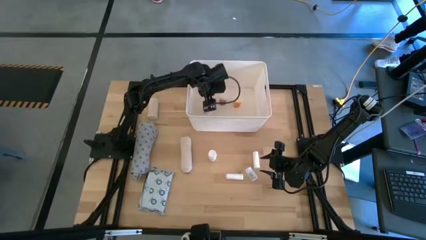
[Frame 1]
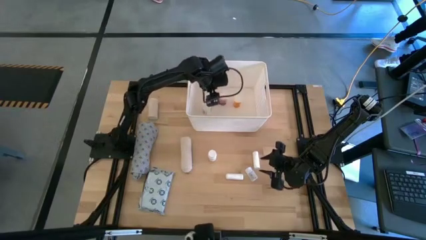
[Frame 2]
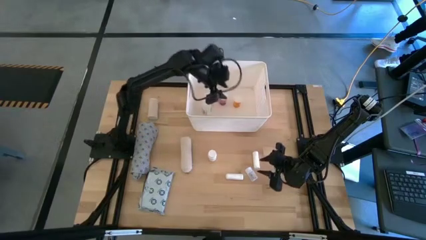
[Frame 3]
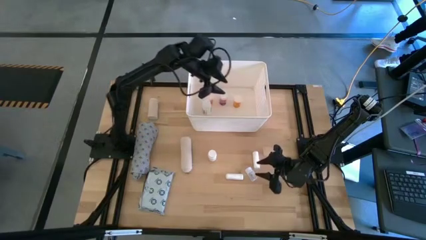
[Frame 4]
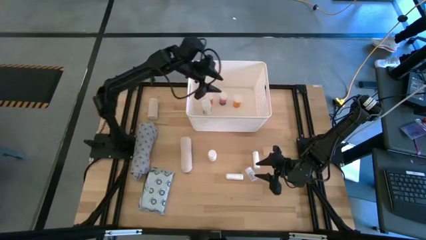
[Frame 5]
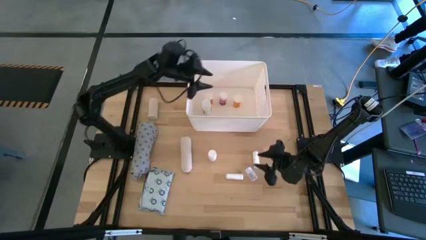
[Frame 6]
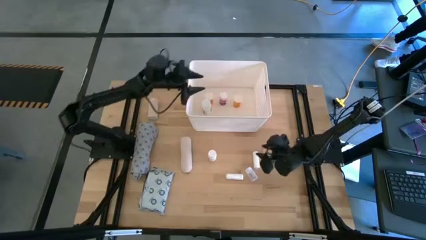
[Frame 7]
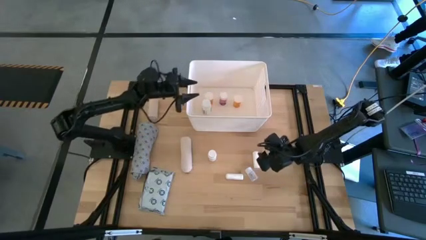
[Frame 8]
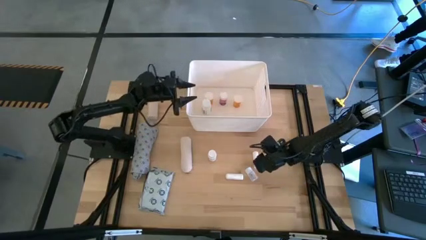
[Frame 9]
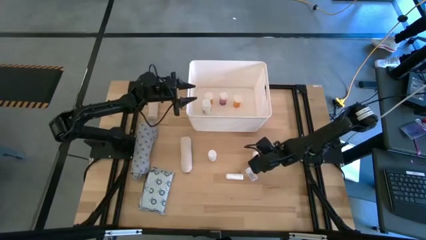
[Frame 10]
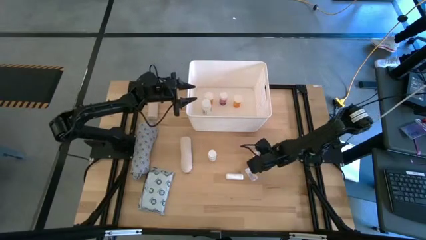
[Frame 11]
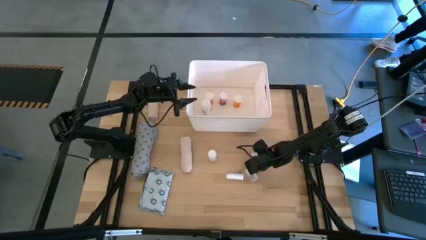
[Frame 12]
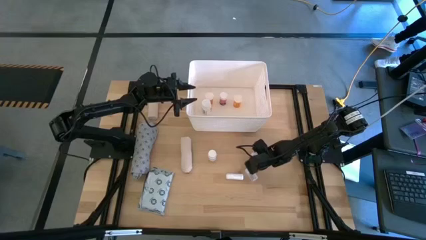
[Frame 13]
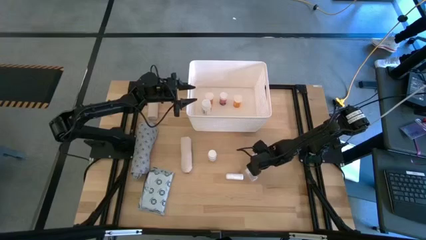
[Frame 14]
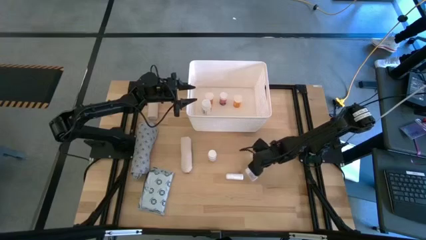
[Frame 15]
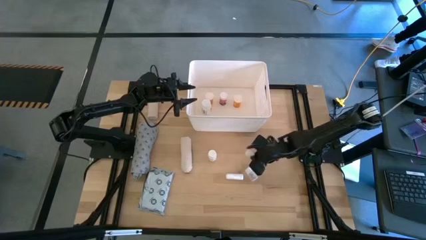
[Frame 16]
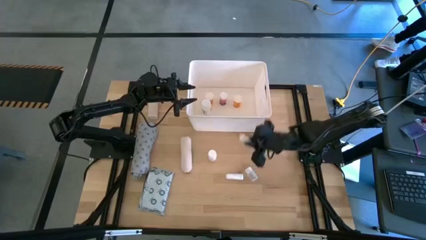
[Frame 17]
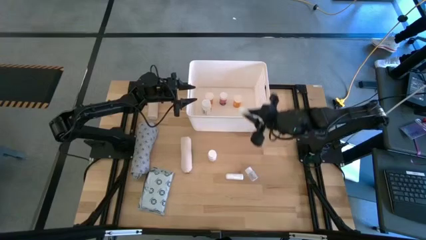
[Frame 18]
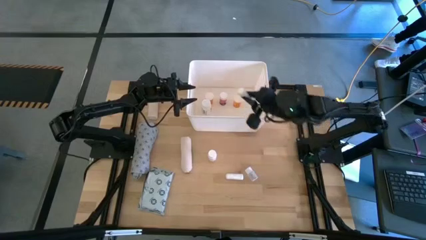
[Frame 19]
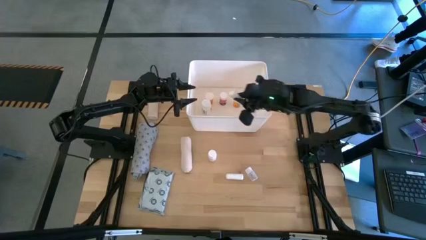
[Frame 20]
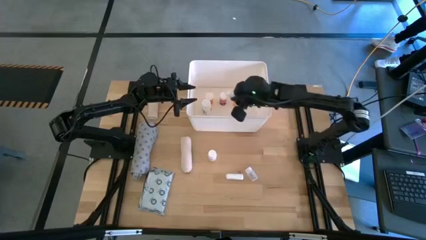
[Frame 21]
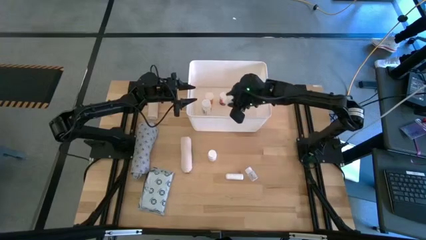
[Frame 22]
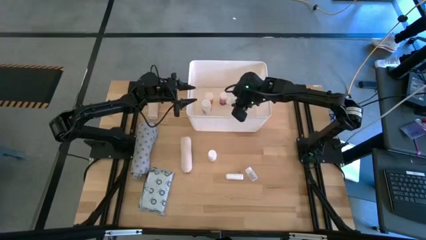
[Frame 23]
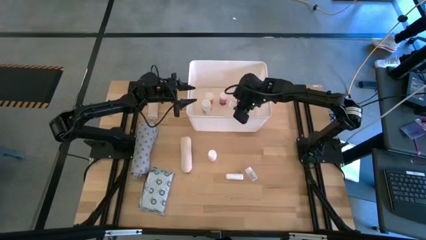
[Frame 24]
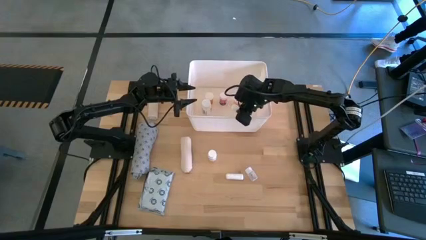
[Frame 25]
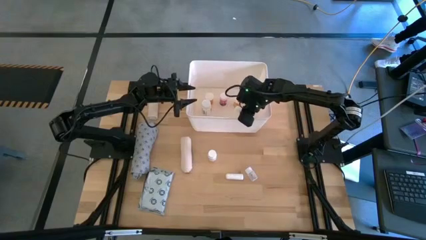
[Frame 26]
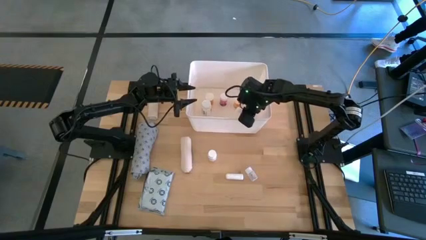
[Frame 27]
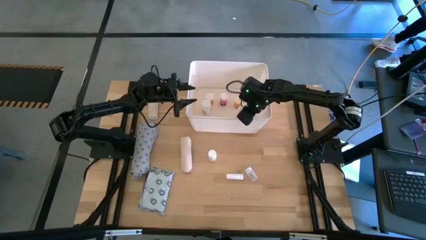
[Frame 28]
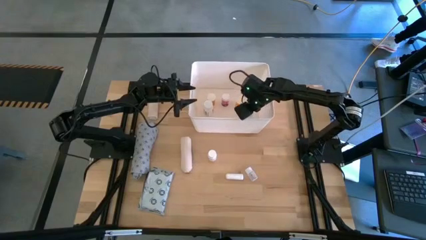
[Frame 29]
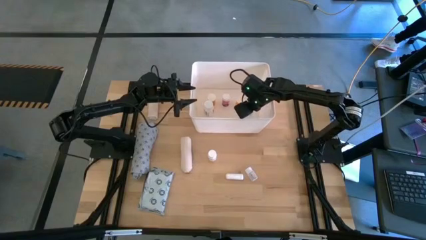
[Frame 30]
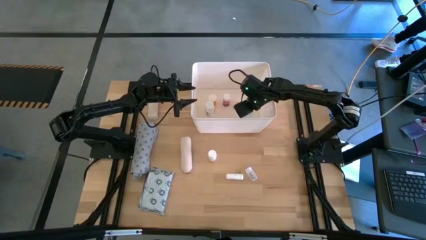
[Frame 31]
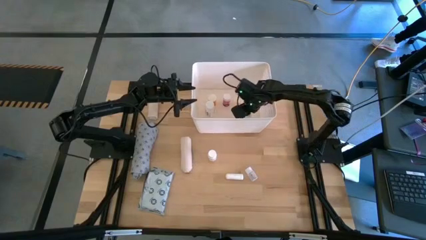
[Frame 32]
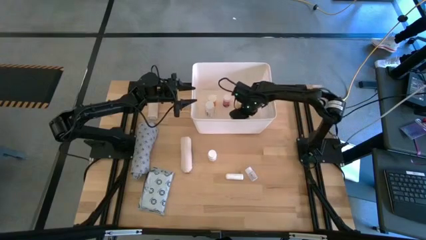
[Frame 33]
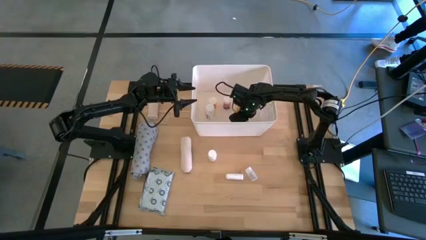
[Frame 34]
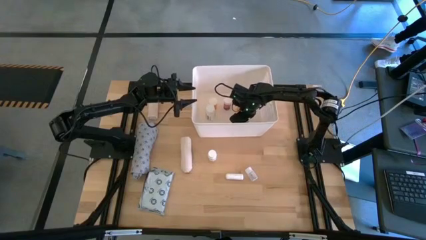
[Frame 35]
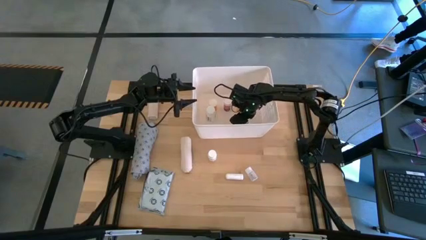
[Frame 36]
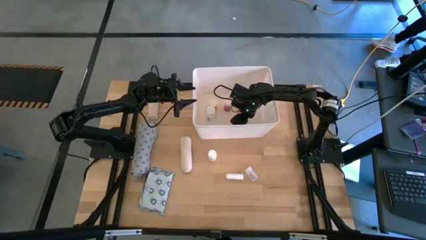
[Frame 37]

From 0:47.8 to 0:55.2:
Task: Pick & place medical supplies in basket/bin
Put the top white rolled gauze into the white bin

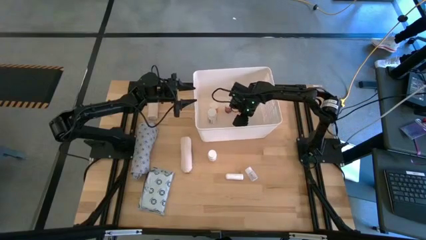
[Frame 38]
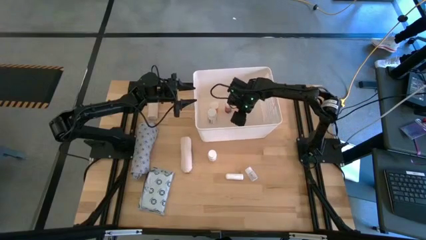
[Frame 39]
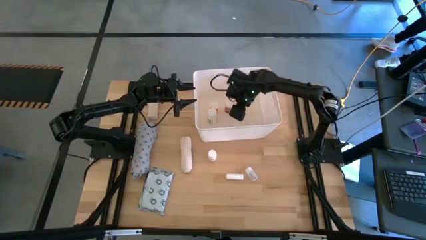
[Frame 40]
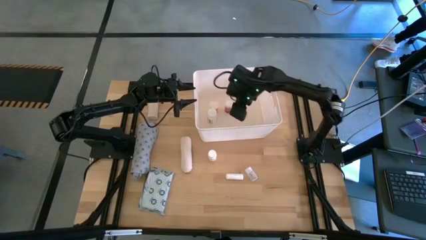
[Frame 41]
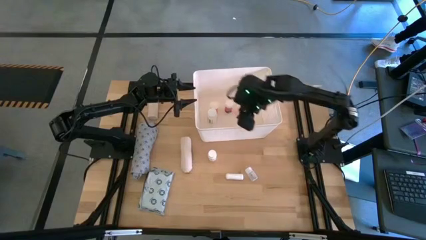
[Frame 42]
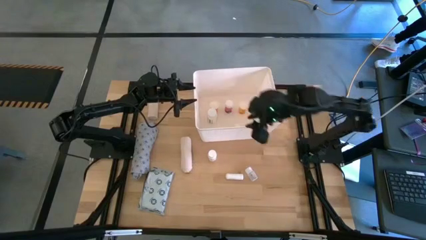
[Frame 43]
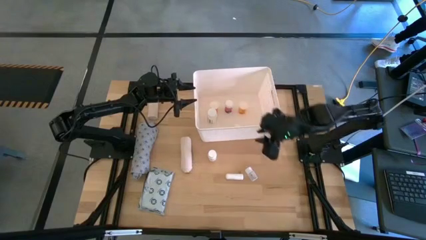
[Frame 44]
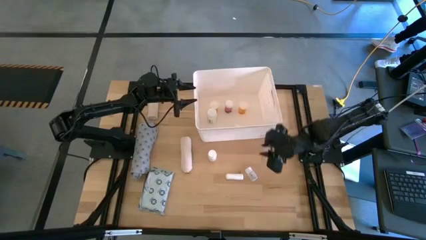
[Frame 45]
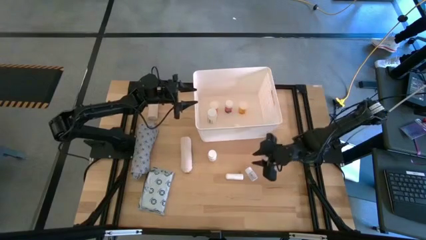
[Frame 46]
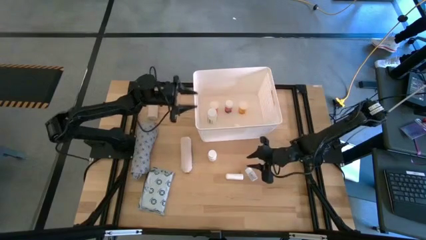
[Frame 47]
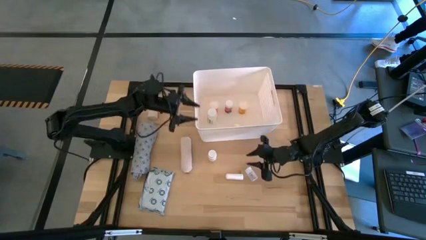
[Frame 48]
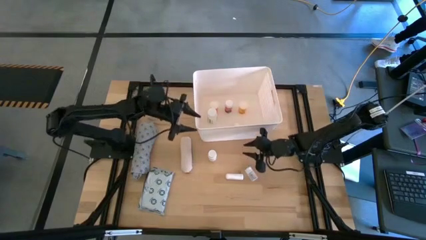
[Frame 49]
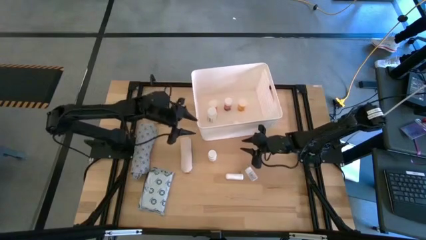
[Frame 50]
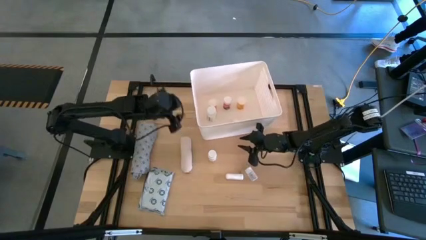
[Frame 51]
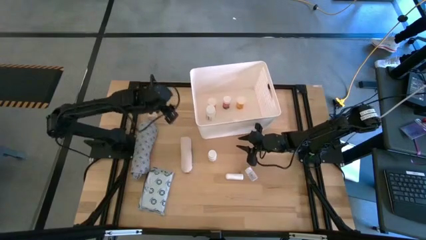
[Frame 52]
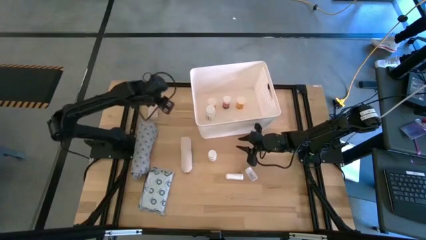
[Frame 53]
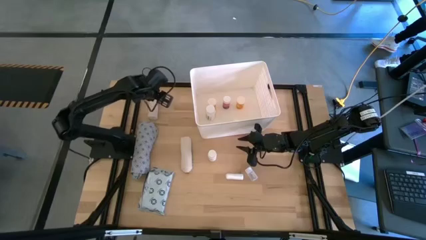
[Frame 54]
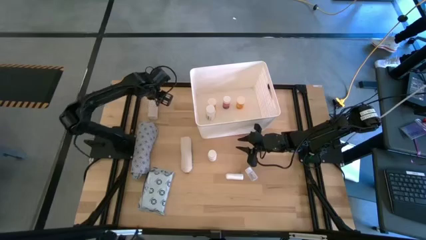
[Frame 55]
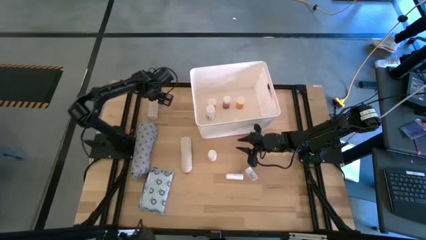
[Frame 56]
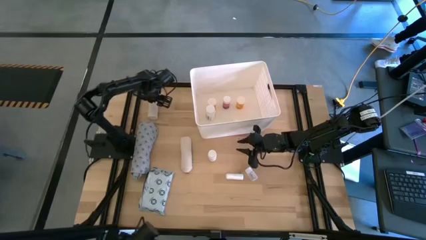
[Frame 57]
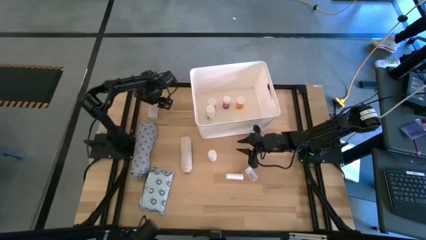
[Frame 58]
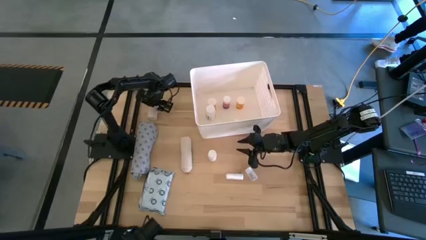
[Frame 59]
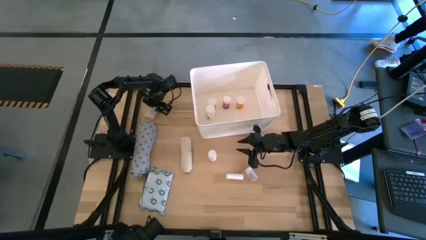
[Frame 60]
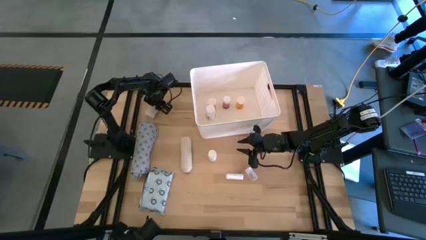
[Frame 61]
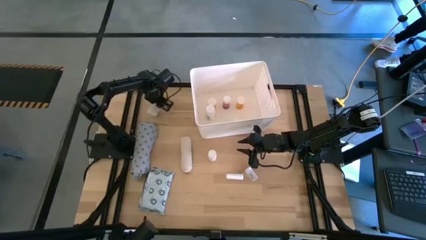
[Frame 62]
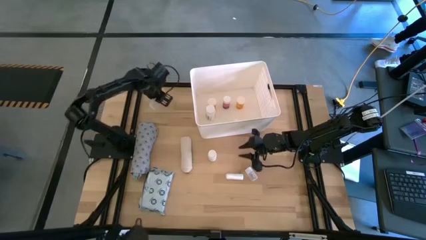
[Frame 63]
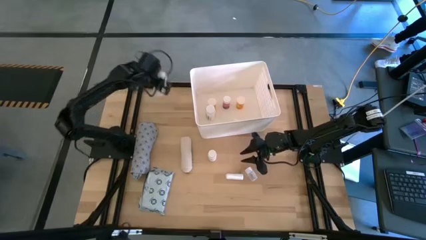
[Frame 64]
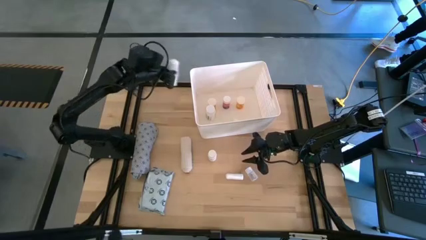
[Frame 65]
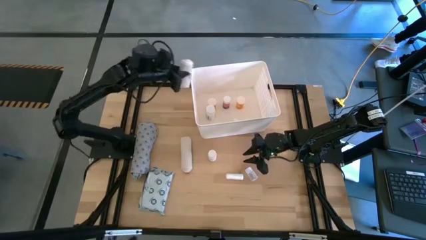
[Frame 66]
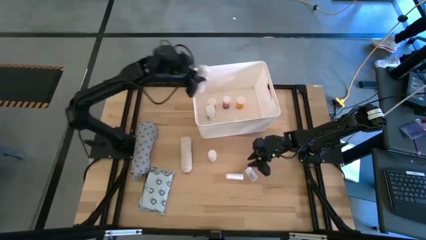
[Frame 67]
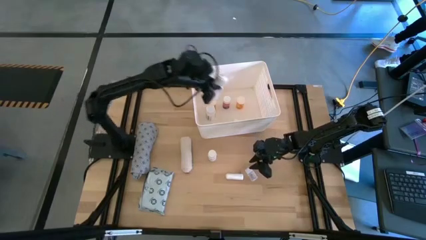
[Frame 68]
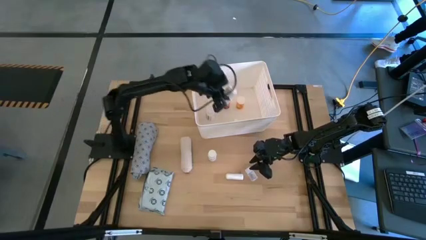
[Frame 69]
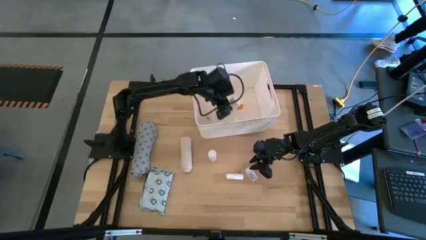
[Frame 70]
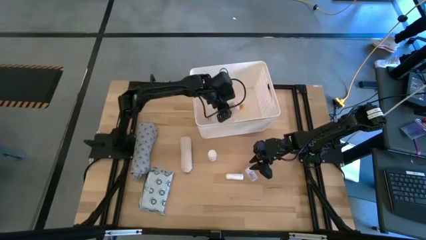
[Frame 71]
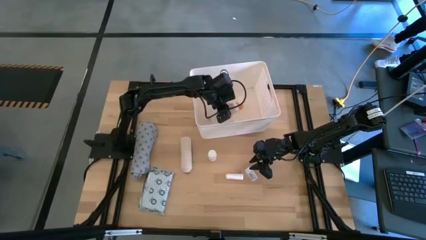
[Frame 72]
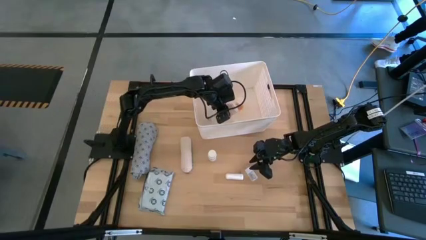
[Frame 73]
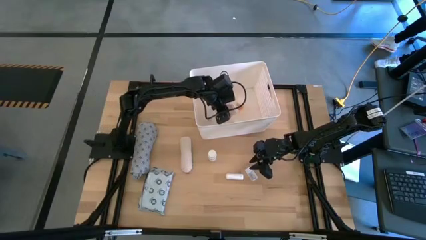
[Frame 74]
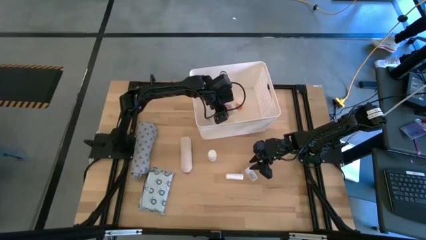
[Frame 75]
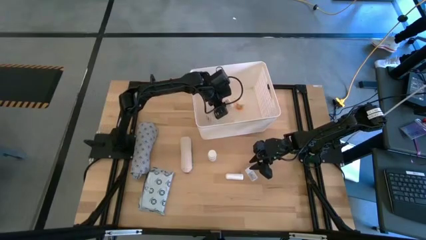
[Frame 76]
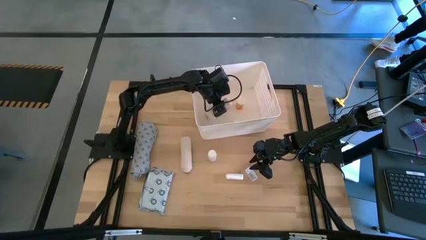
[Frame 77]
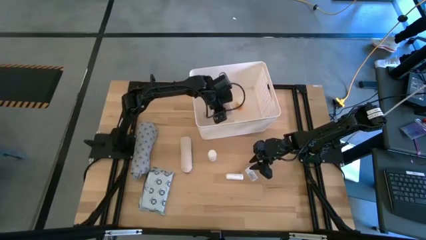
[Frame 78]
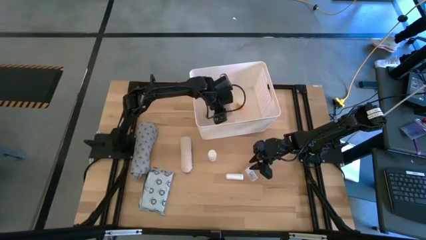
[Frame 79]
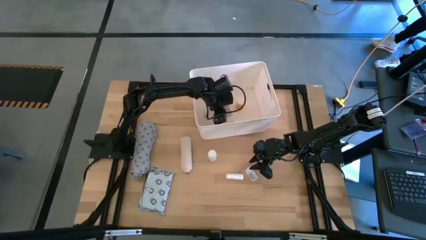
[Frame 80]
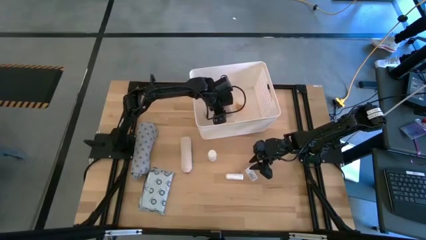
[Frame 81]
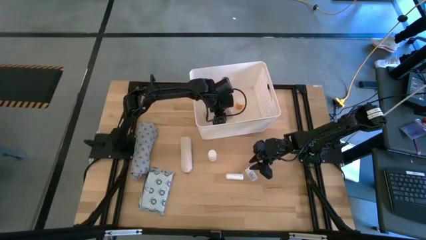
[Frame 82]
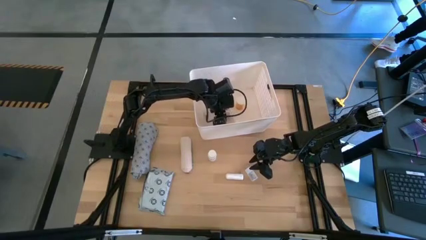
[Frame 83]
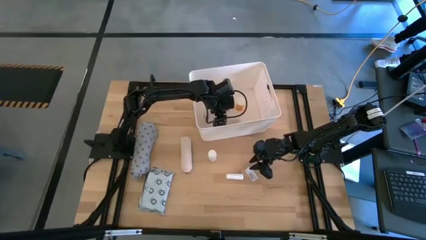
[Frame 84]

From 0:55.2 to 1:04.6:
Put the top white rolled bandage into the white bin
